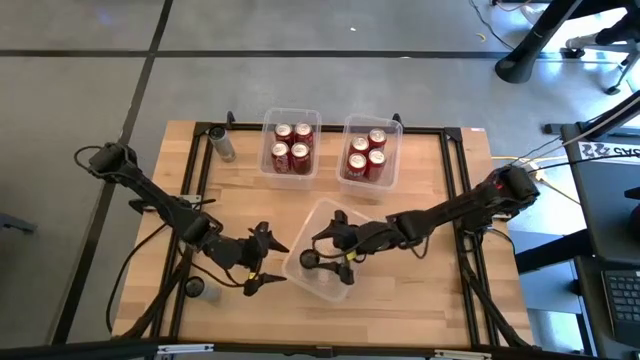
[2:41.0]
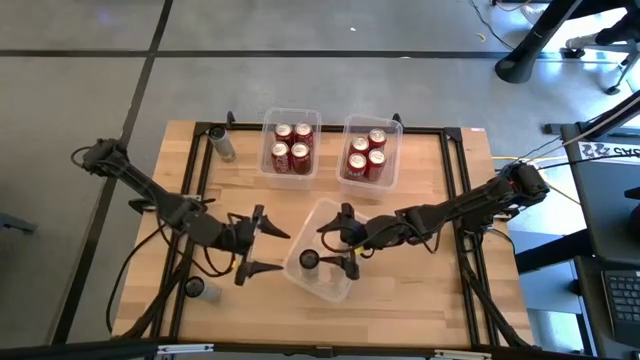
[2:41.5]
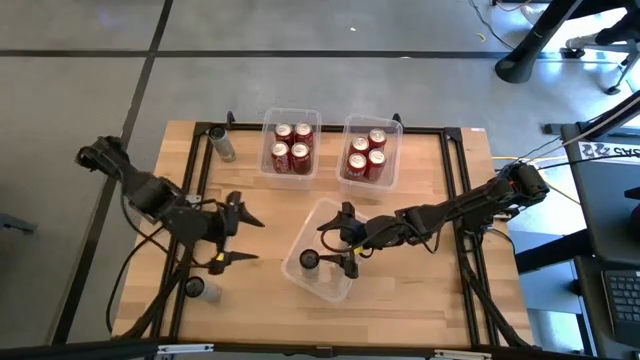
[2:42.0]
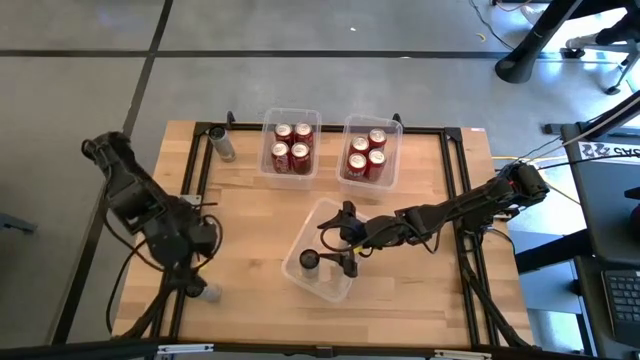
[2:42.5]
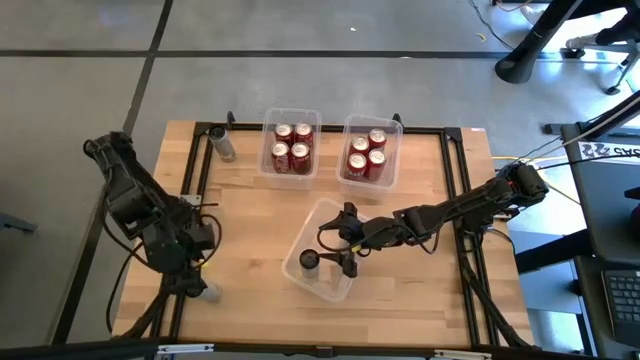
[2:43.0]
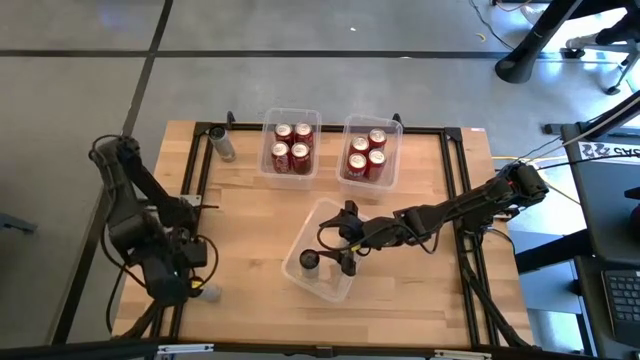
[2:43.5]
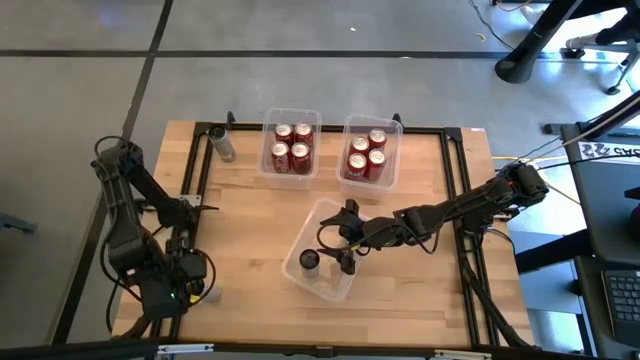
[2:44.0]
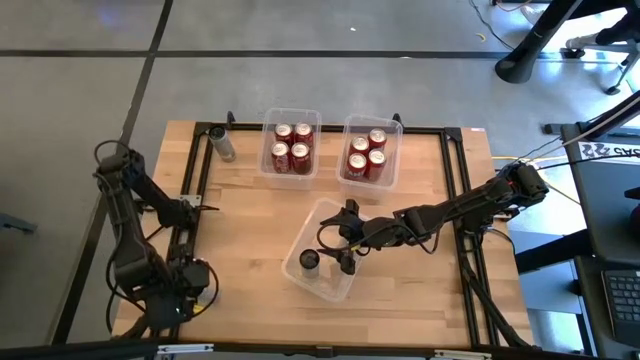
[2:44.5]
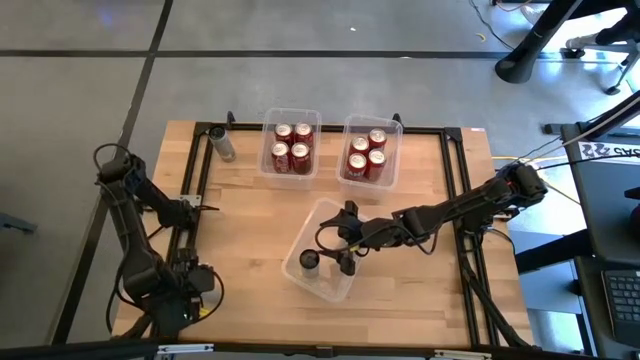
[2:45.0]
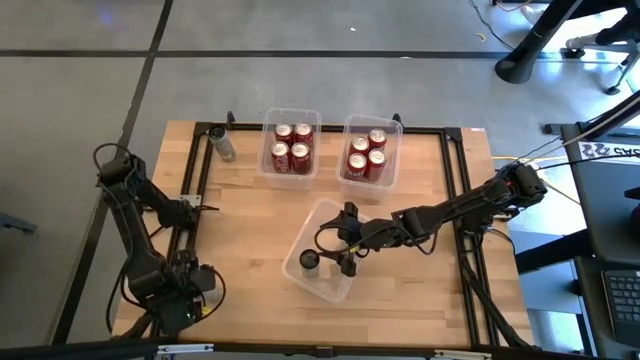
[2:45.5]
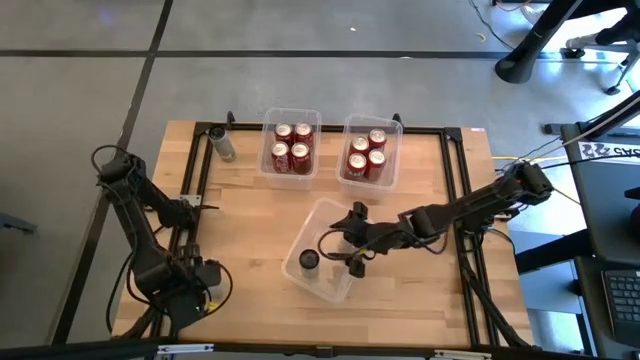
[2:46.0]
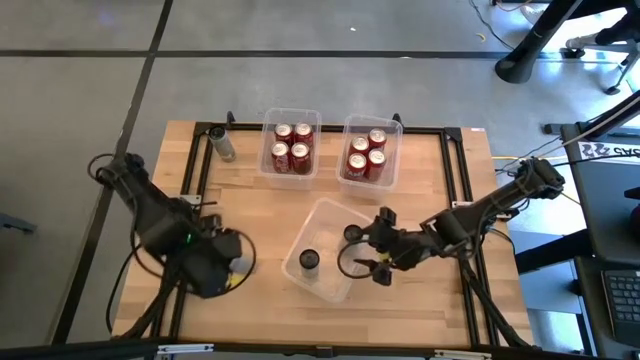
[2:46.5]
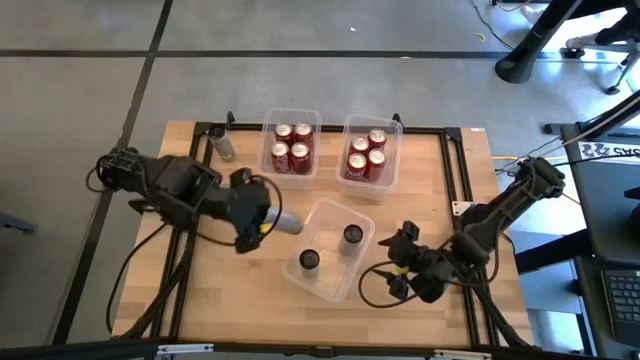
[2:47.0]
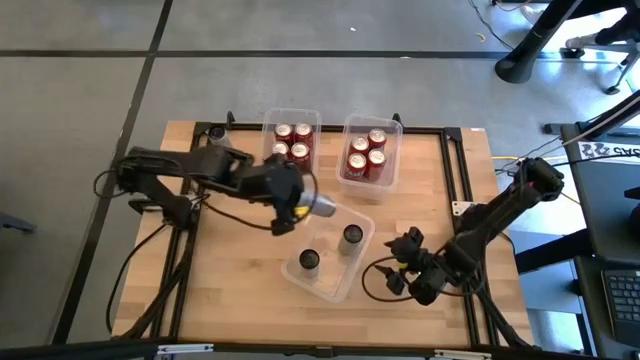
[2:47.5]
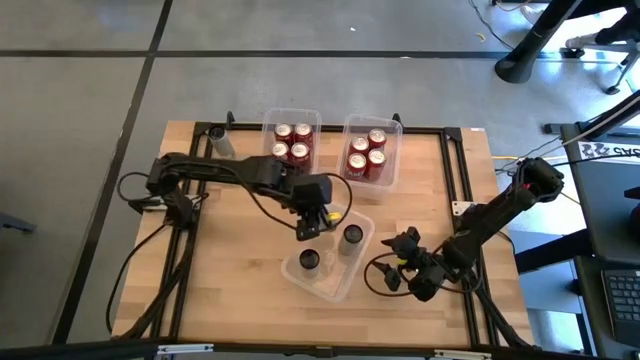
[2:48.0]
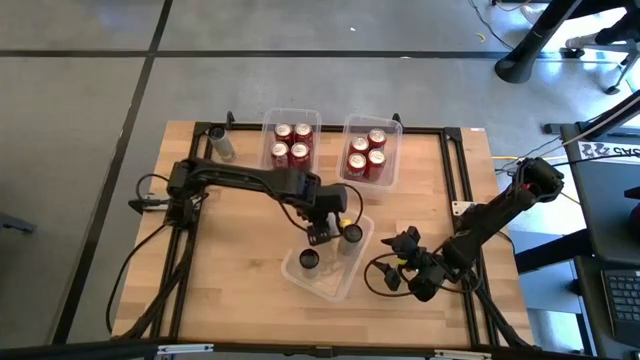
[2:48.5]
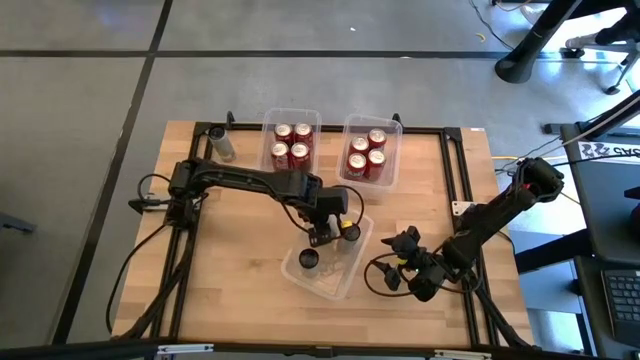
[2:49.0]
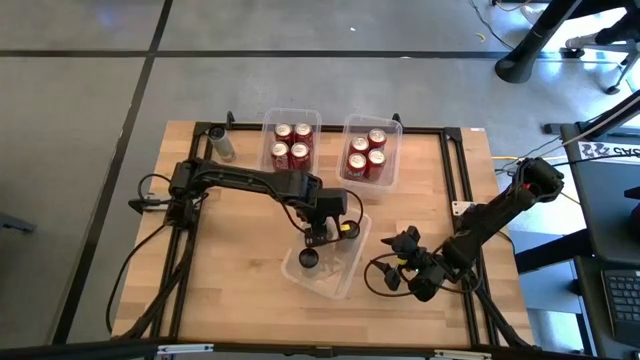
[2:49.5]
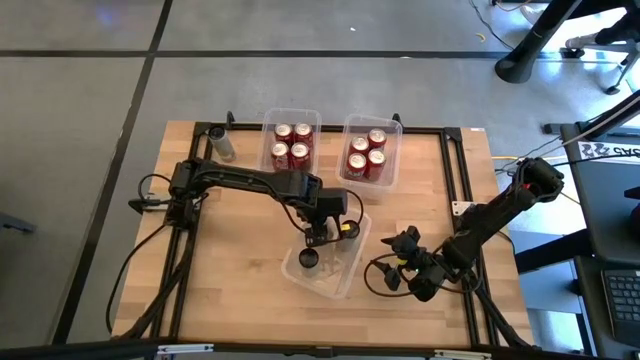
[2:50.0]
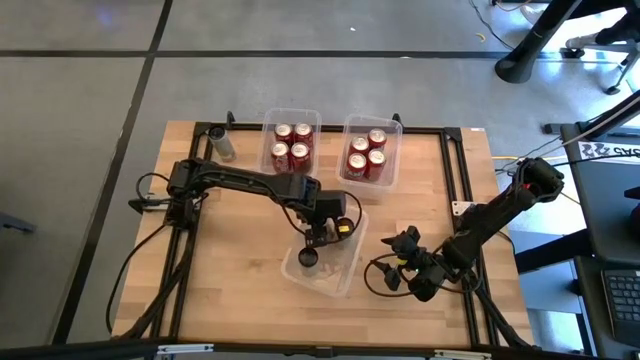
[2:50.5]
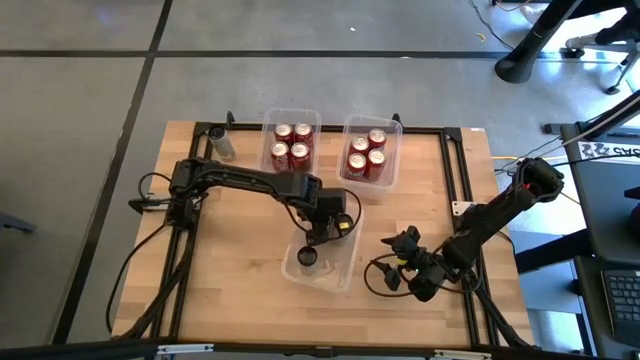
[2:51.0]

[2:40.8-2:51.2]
Task: Sort soda cans
Put the bottom white soda can into the bottom center transparent bin aligned with the other white soda cans

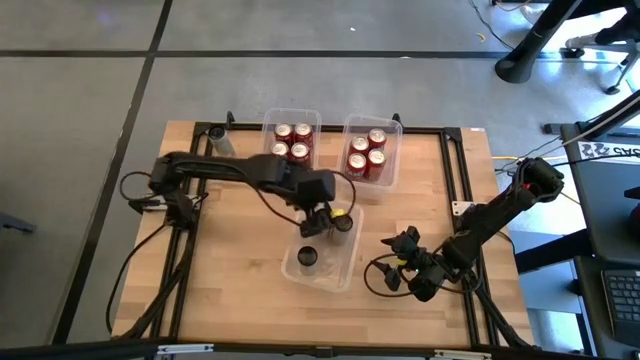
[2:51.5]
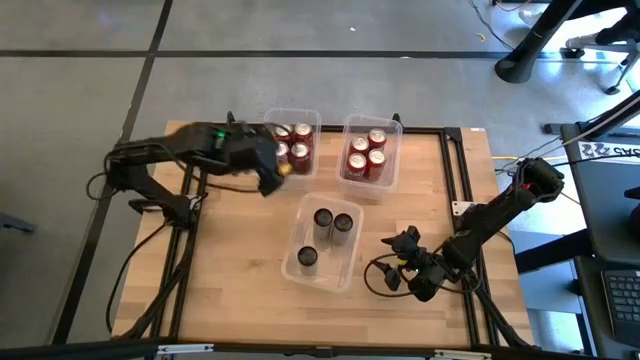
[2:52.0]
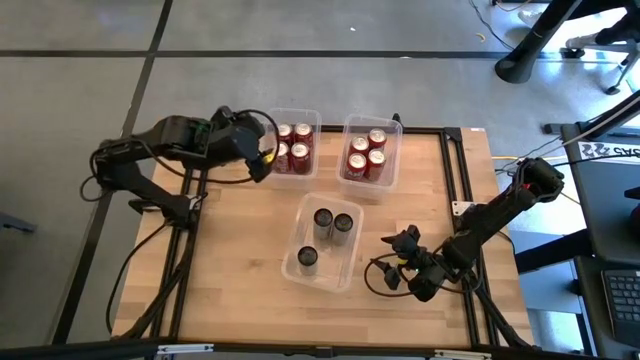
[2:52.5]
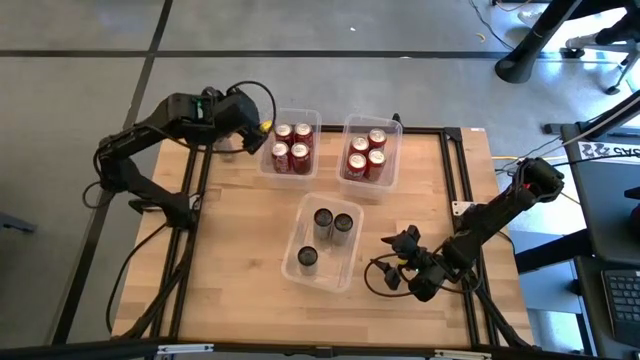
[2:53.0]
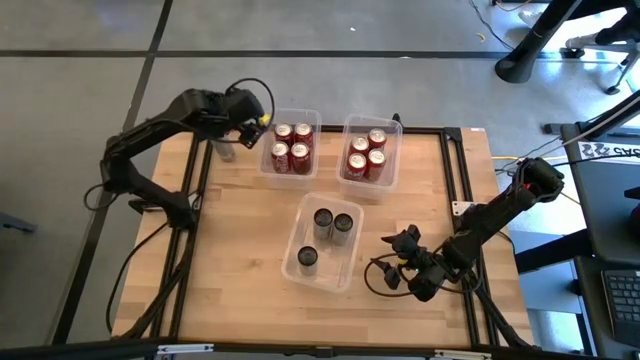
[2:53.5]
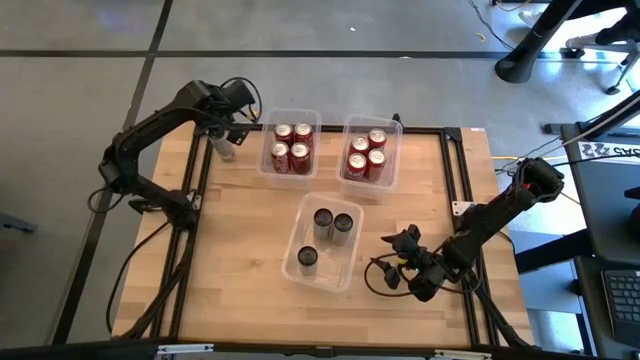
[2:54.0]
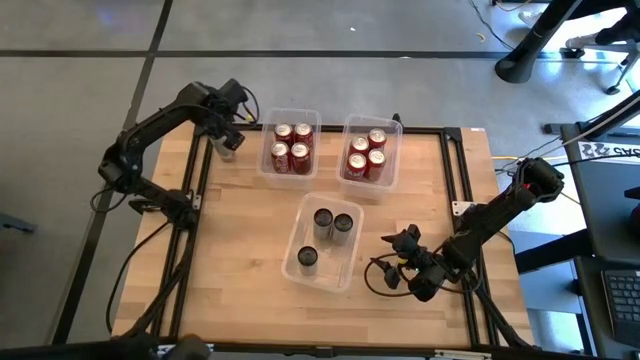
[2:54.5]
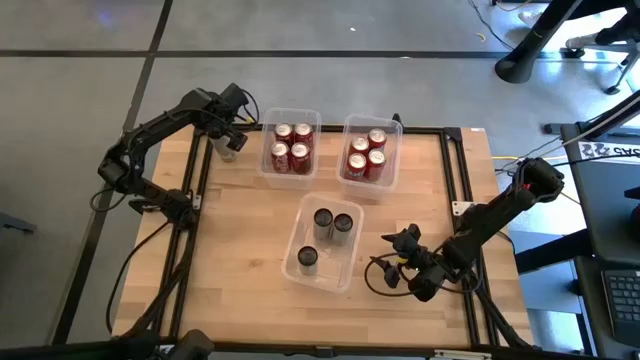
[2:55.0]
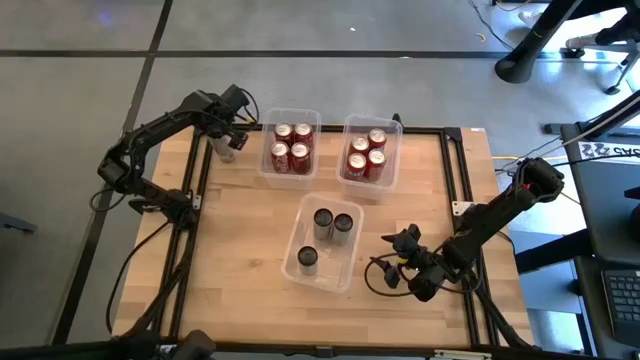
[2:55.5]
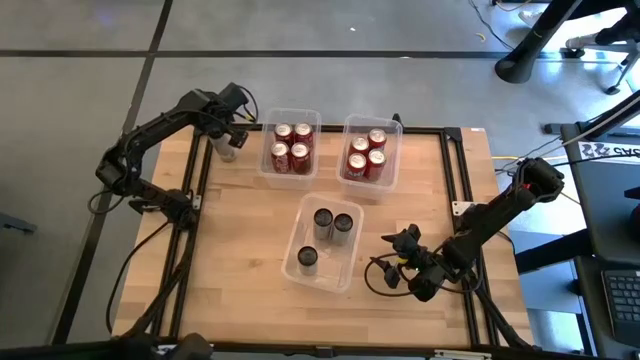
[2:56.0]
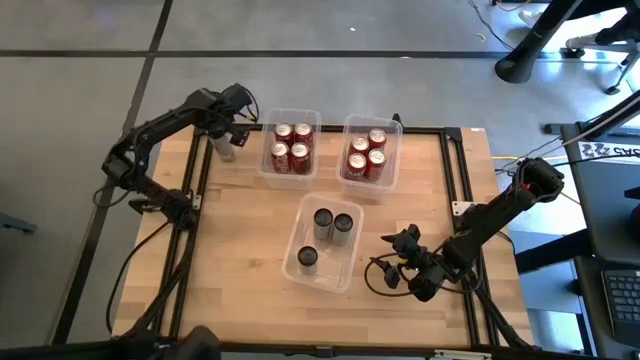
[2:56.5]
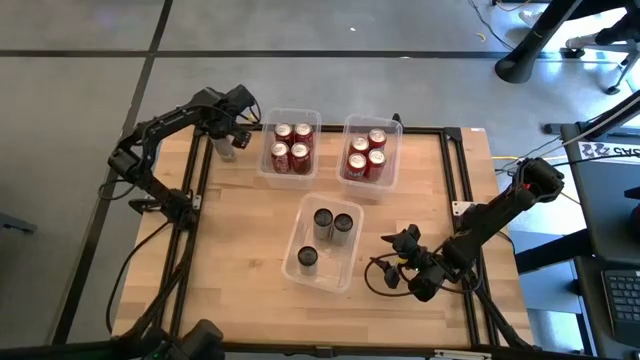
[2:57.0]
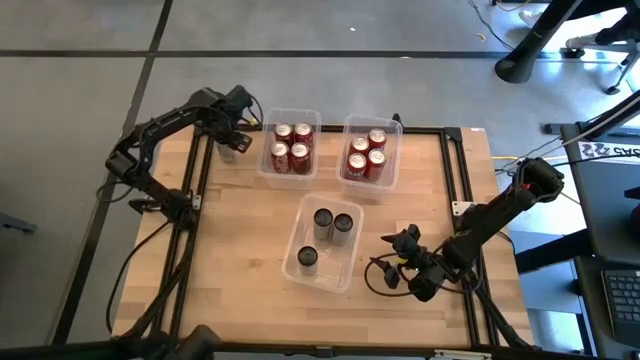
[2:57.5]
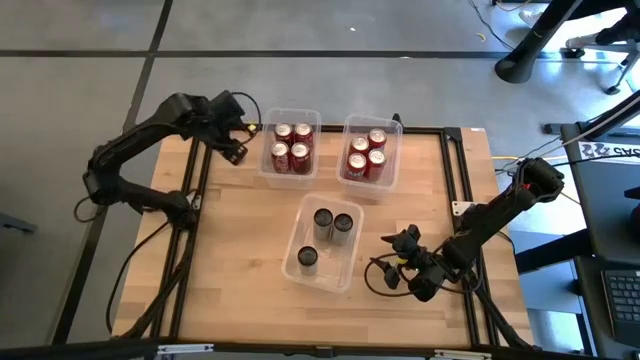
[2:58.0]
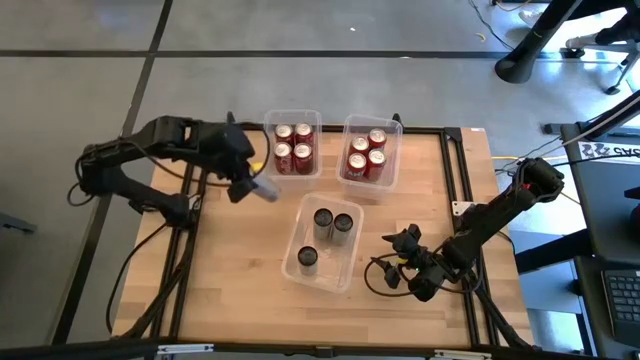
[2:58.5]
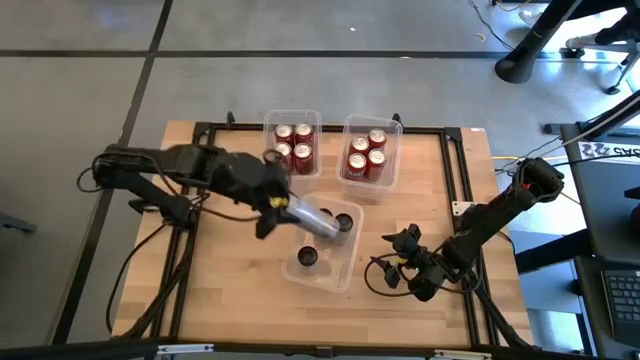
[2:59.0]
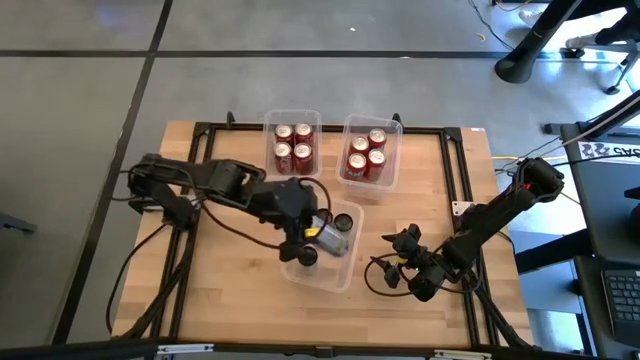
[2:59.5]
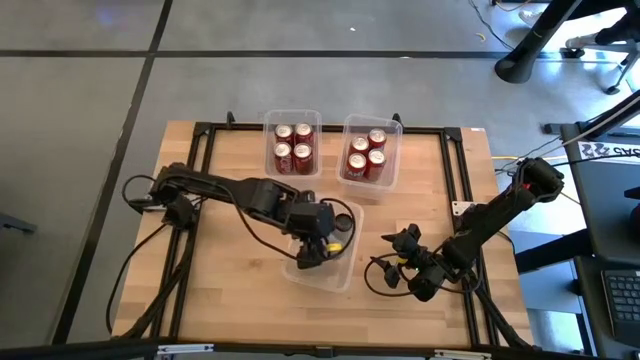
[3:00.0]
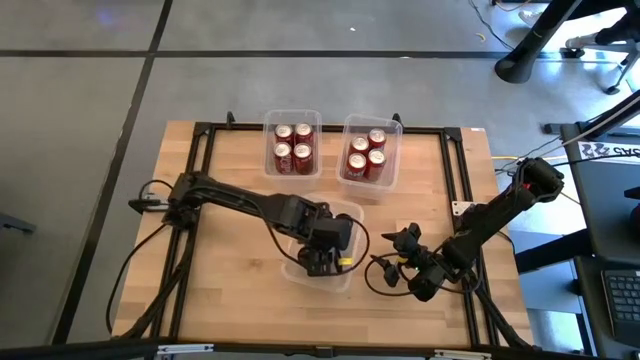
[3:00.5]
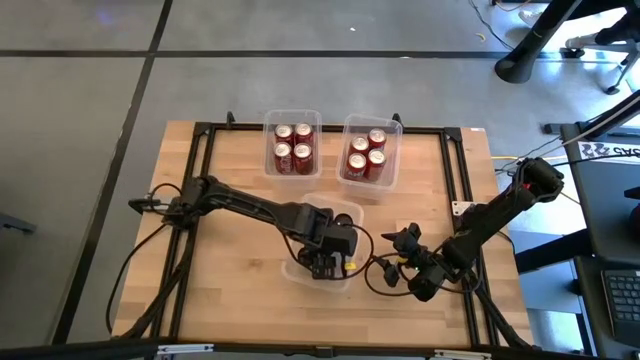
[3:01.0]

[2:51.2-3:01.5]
Put the white soda can into the bottom center transparent bin aligned with the other white soda cans

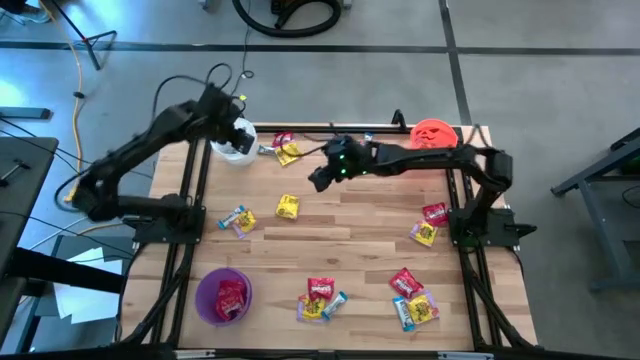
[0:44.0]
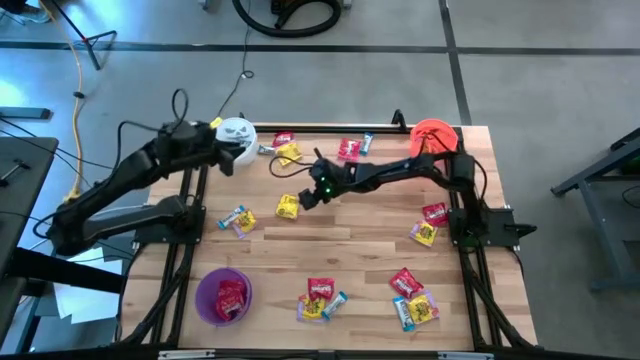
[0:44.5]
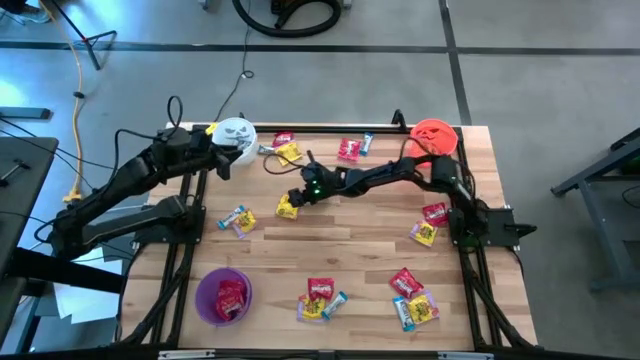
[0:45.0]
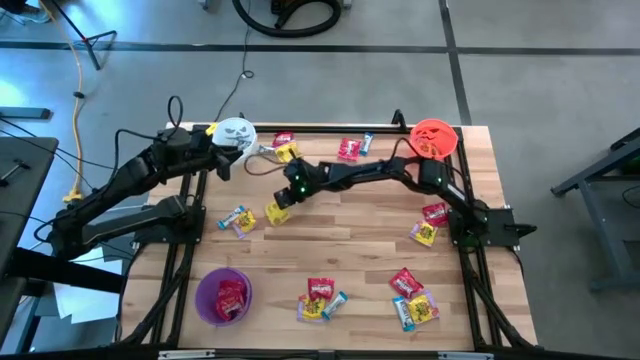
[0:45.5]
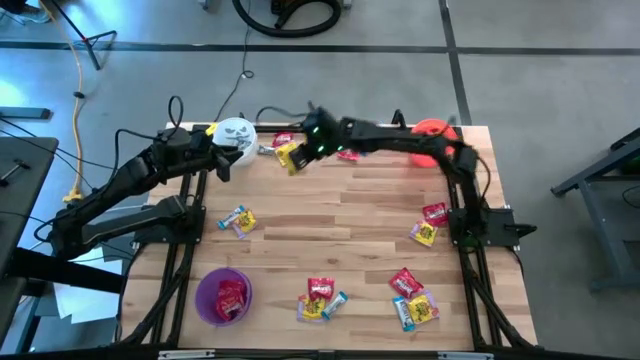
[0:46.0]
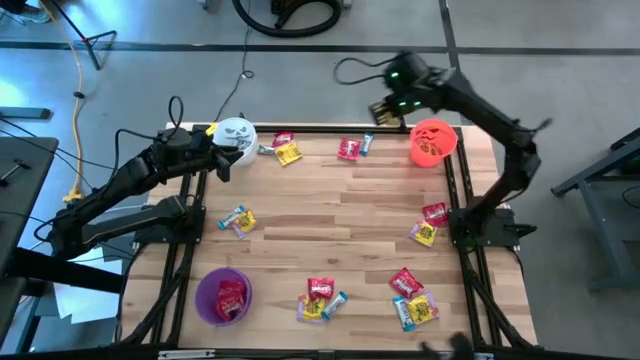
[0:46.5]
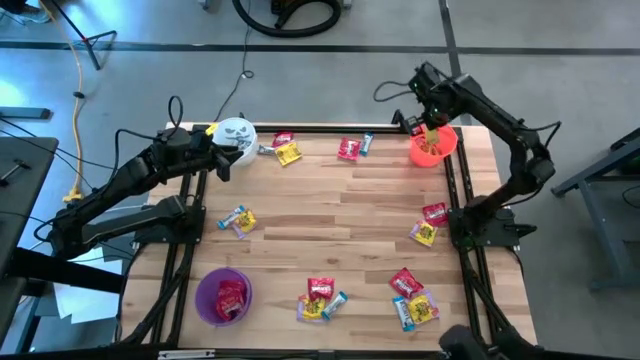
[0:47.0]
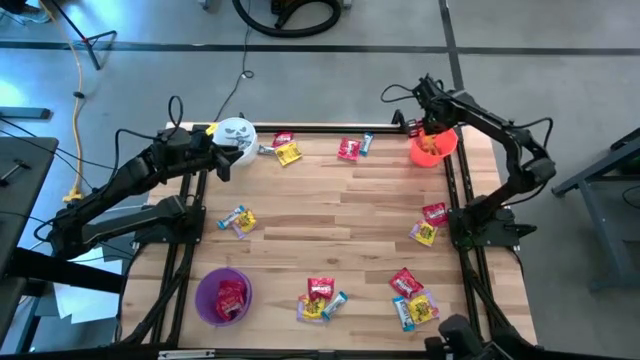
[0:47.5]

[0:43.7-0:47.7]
Task: Sort candy
Put the yellow candy into the orange bucket
